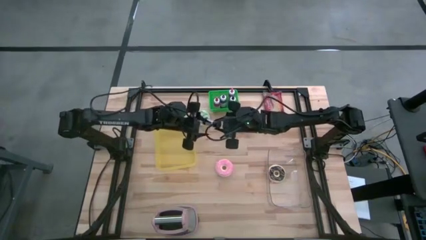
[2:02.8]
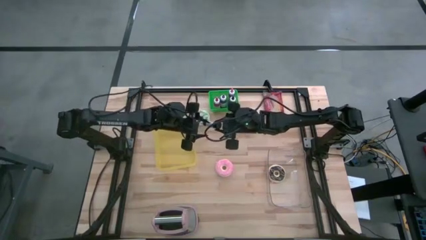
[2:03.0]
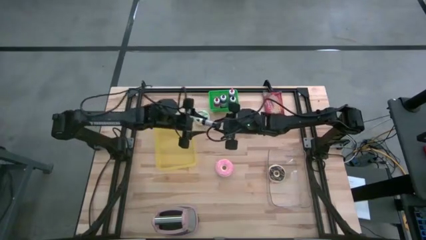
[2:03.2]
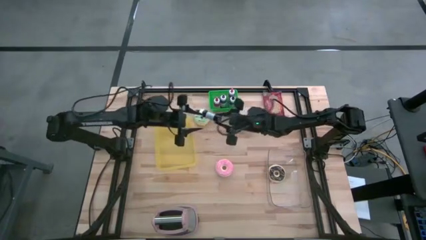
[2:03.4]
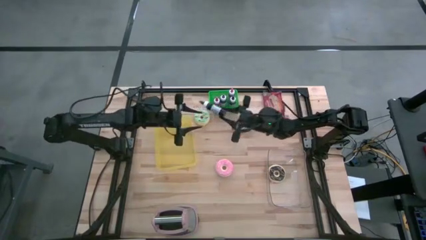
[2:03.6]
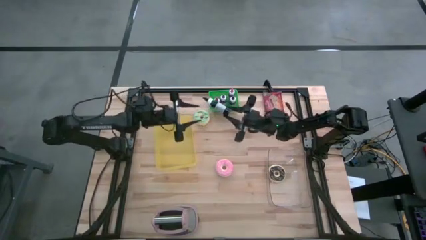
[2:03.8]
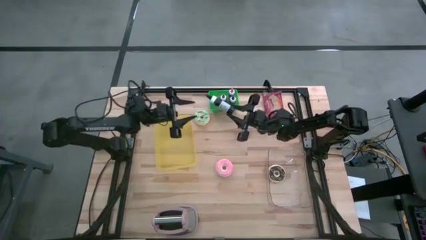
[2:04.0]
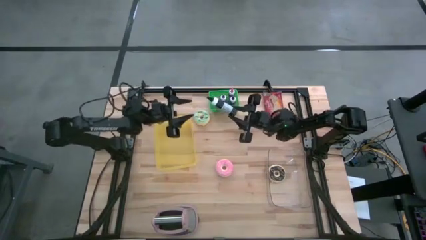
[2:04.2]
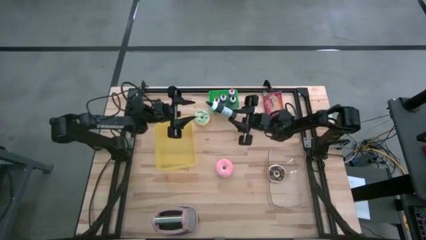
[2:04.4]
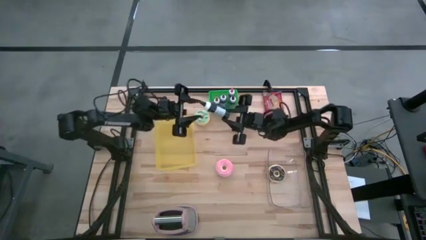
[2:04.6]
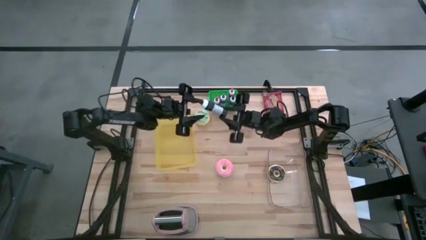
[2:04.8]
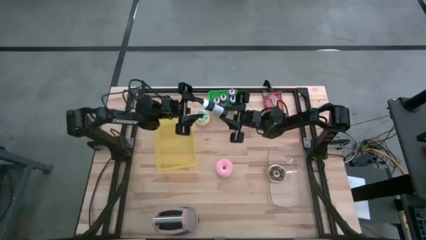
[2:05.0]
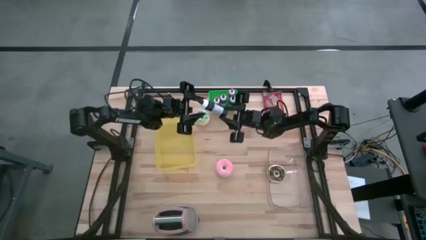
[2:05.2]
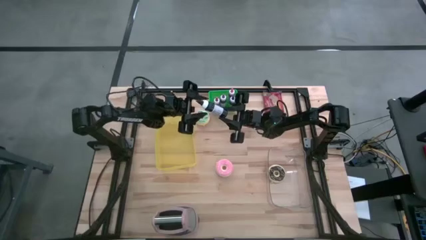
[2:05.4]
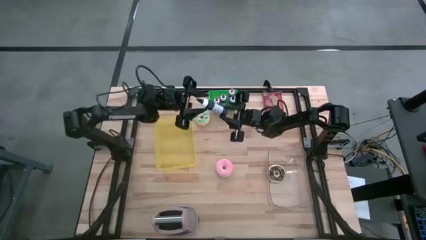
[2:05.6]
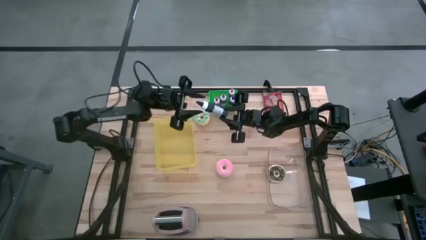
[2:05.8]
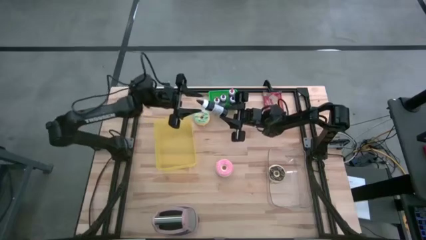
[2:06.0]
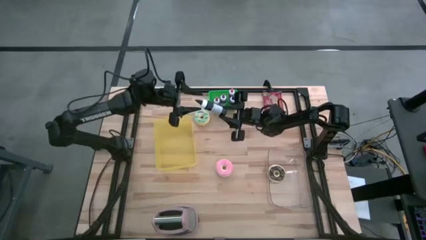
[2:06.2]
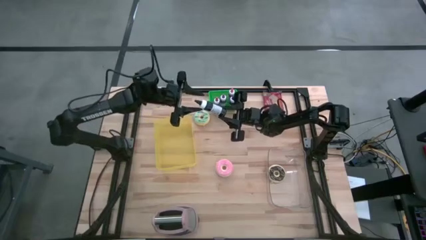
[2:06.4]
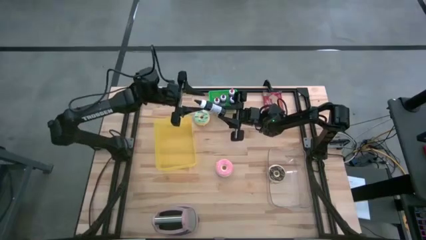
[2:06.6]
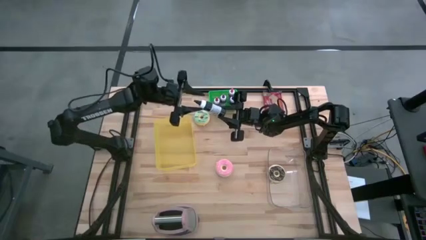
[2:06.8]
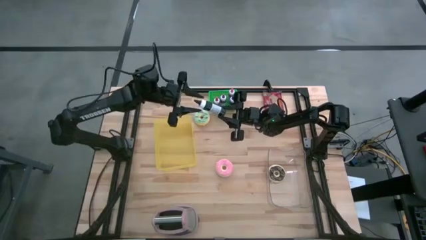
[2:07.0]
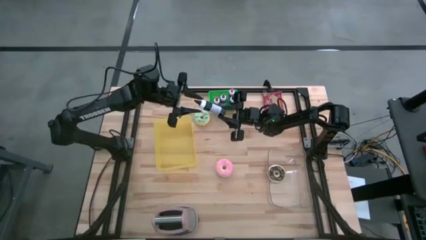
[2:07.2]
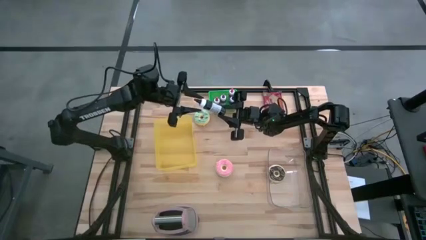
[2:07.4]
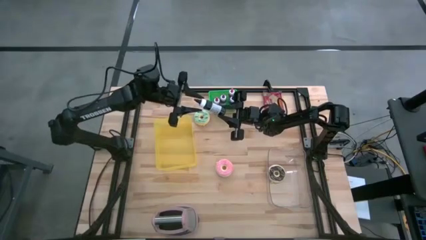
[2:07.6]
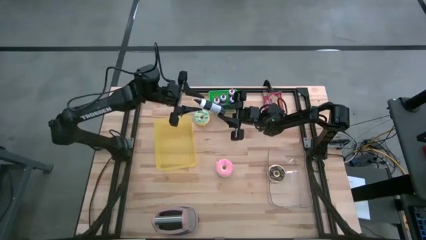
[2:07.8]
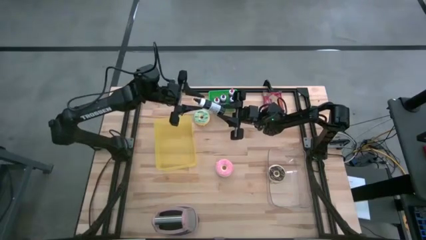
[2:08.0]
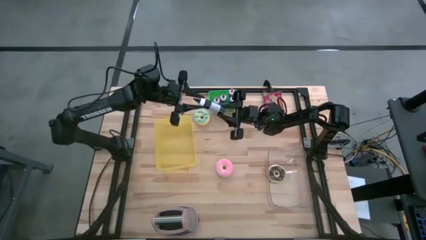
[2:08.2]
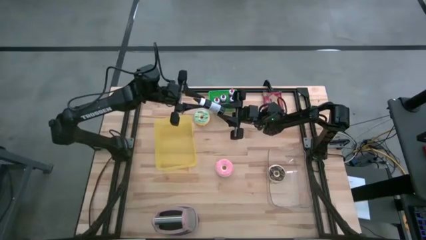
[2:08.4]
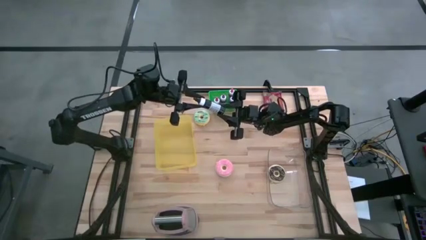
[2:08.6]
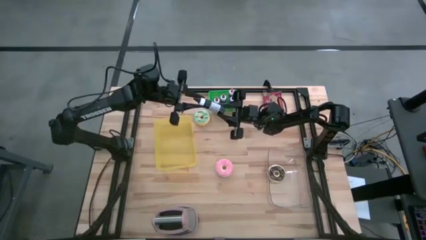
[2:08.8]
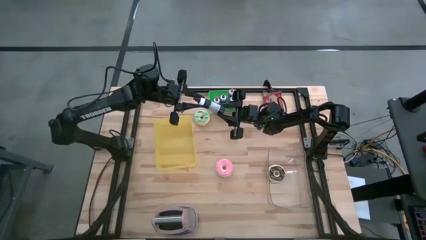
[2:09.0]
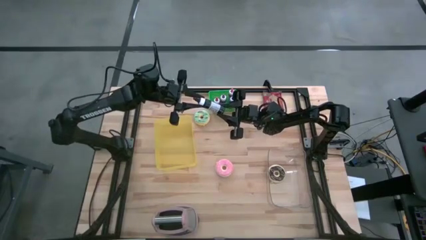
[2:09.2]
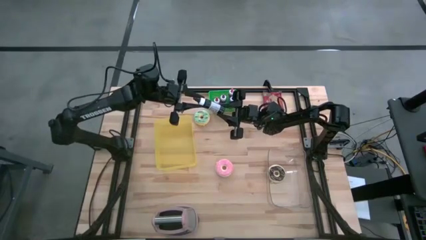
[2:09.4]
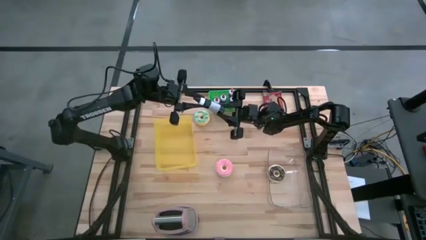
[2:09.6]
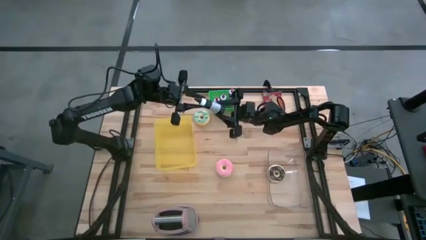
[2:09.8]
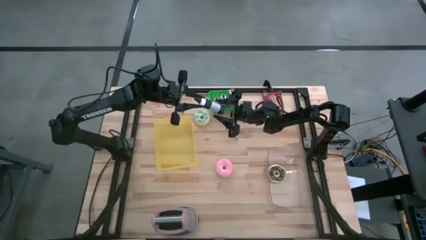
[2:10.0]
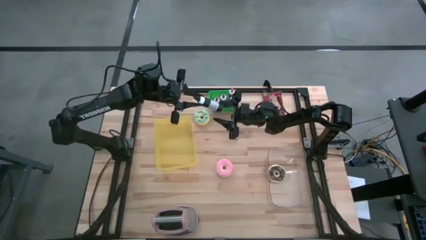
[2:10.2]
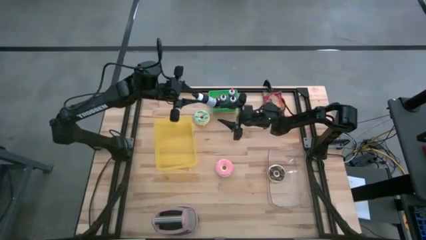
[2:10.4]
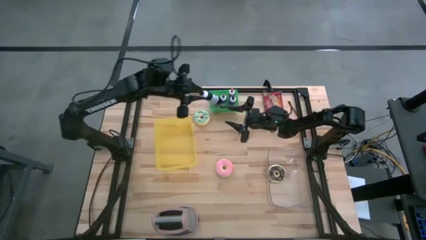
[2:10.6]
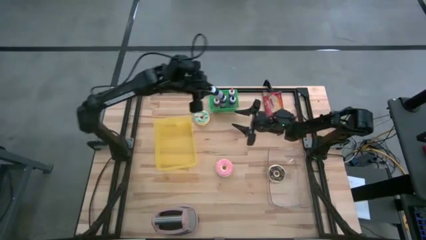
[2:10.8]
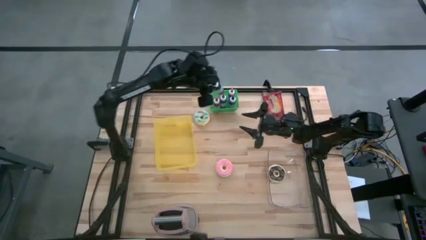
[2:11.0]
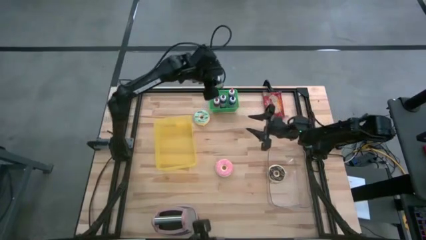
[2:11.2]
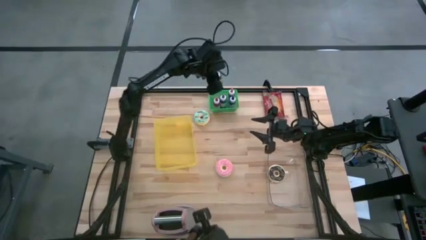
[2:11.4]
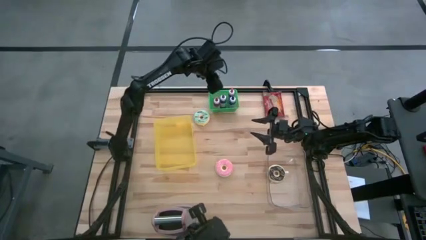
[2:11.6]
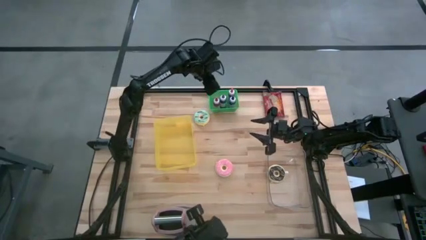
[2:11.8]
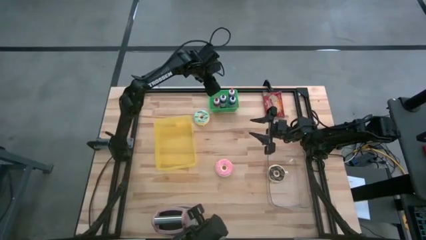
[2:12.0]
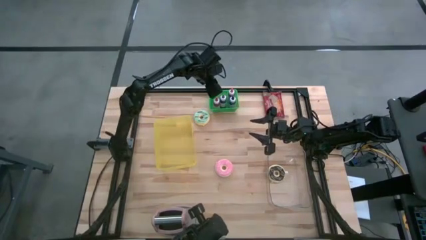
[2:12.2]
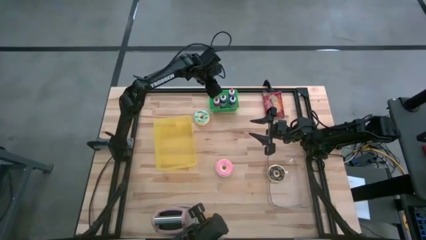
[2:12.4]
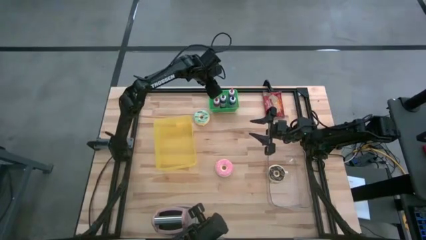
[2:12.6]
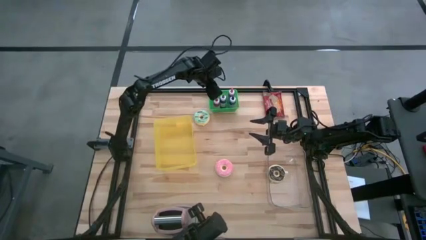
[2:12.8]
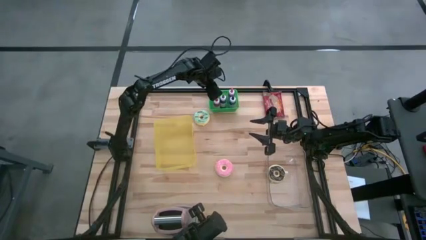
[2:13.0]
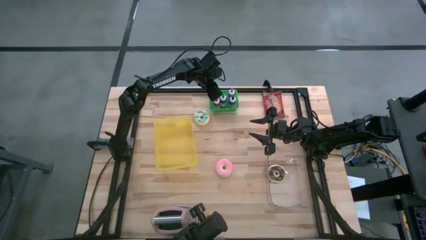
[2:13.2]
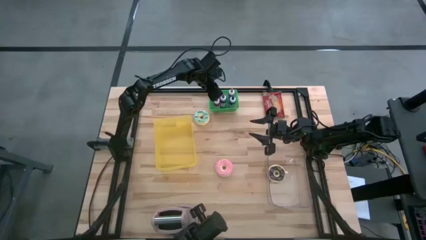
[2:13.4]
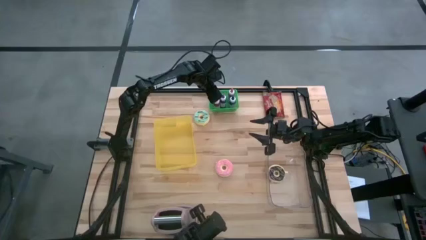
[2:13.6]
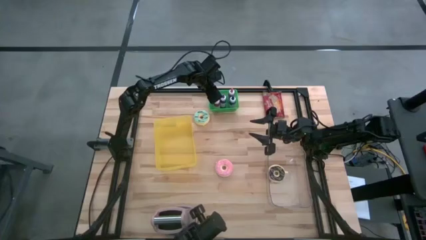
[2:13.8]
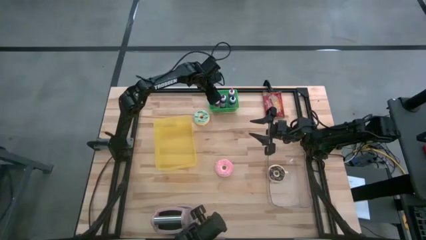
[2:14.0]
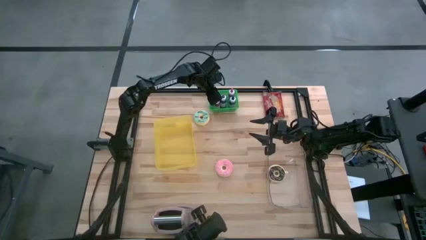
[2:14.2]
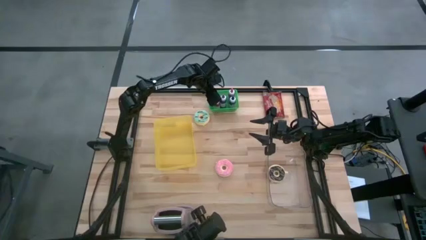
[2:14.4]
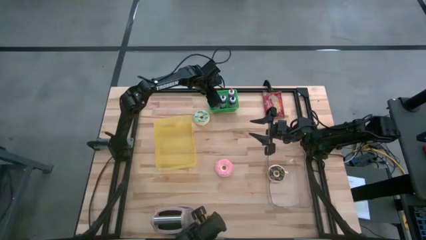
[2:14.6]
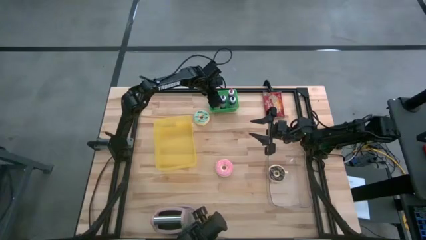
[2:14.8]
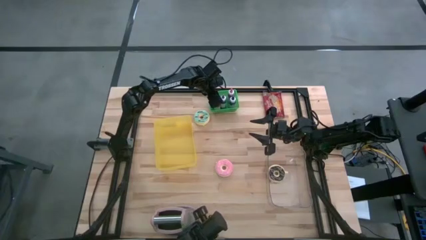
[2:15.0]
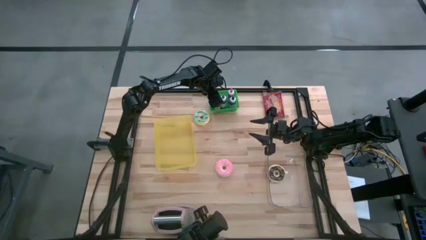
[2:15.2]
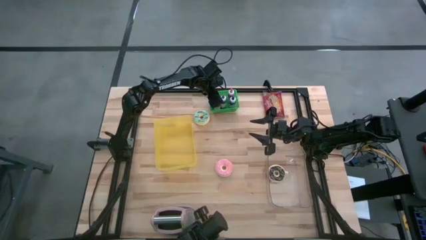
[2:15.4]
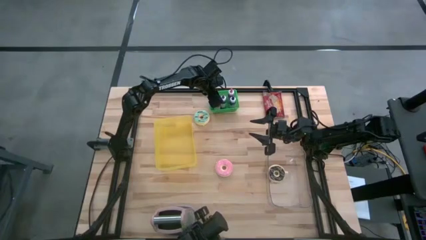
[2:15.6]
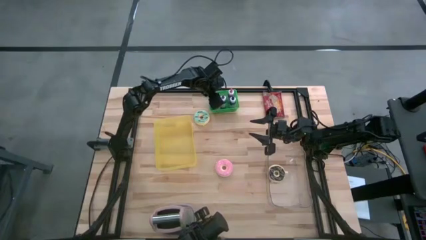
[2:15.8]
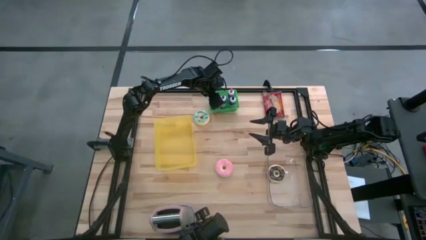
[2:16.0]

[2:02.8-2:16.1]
Task: Pick & Place Food Item
Put the black food coloring bottle into the green bin

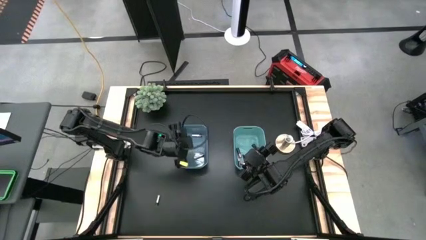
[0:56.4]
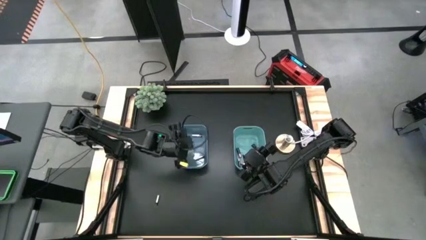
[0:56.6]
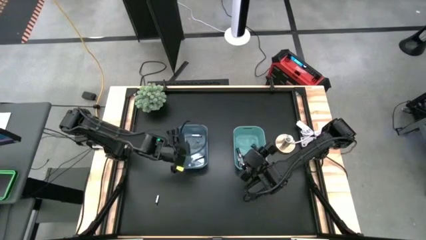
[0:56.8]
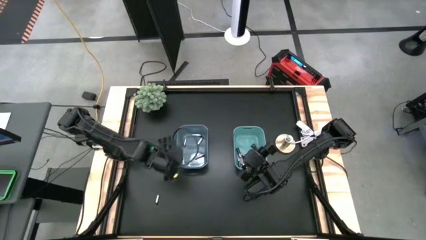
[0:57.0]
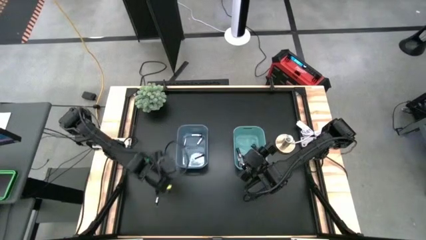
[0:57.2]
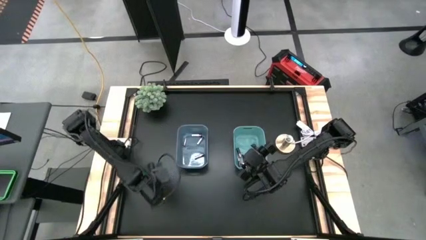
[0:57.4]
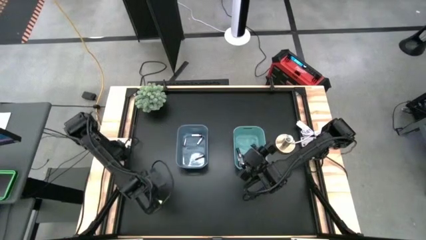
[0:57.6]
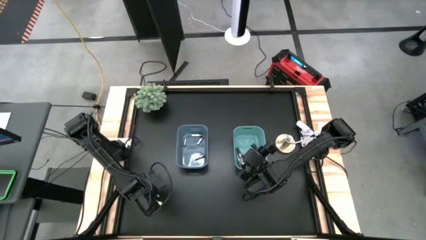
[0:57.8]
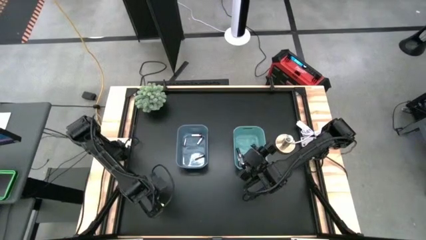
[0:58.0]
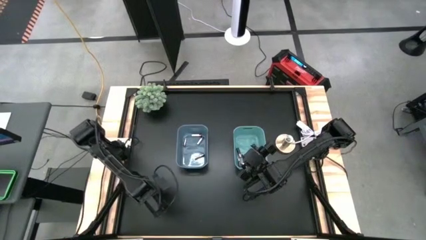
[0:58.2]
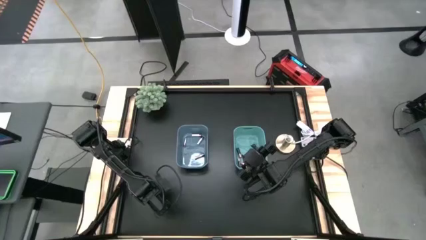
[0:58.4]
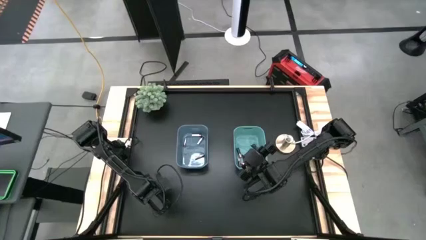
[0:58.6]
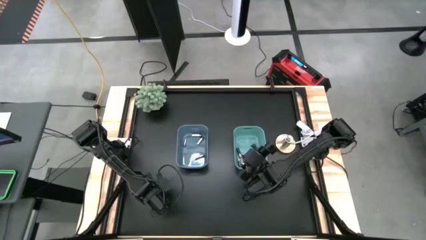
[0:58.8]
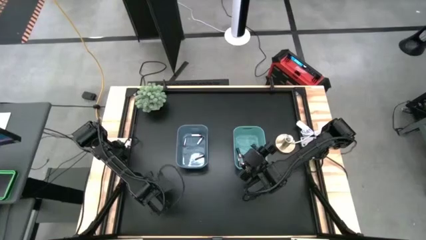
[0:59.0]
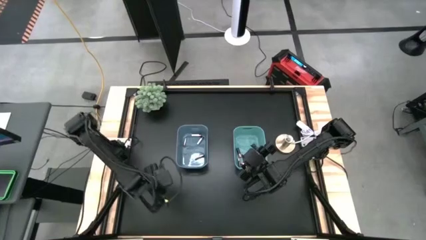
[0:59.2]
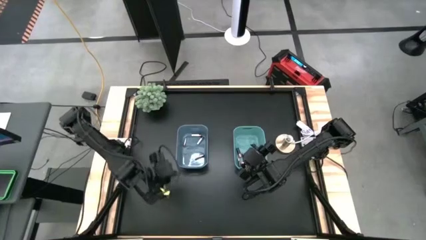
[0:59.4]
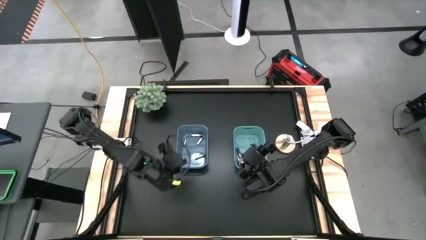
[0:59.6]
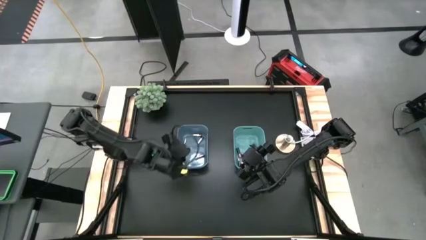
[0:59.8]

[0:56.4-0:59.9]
Task: Sort batteries
Put the small silver battery into the blue bin
